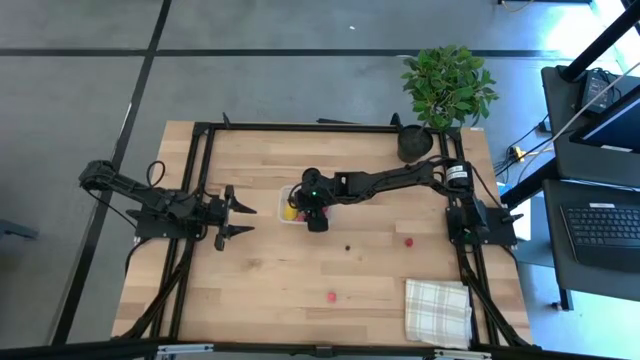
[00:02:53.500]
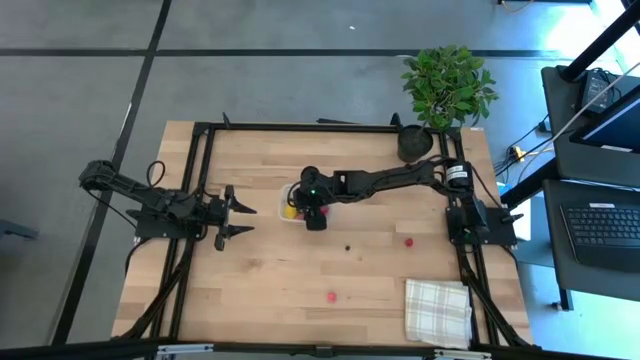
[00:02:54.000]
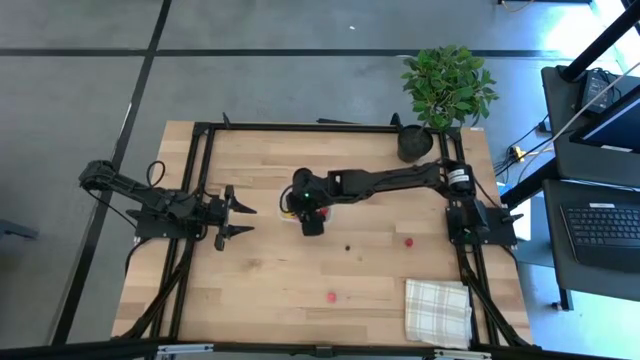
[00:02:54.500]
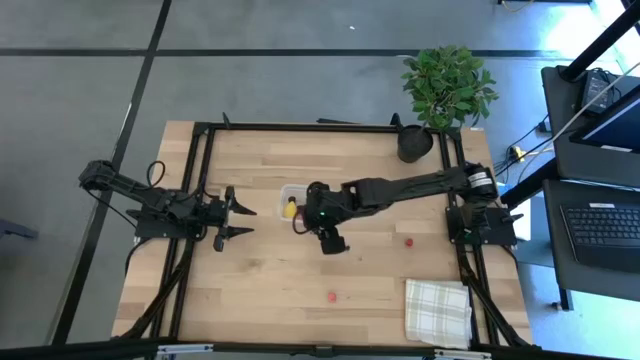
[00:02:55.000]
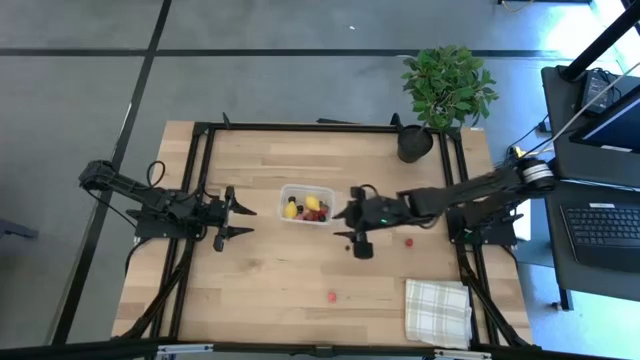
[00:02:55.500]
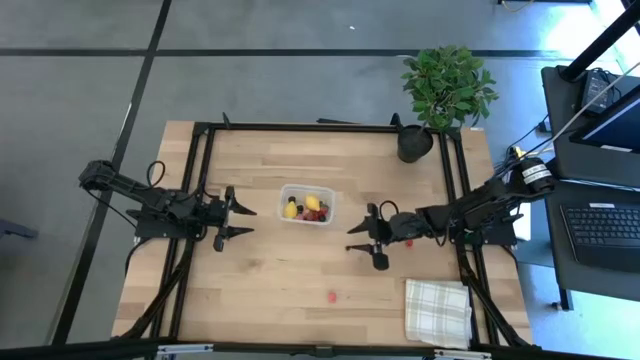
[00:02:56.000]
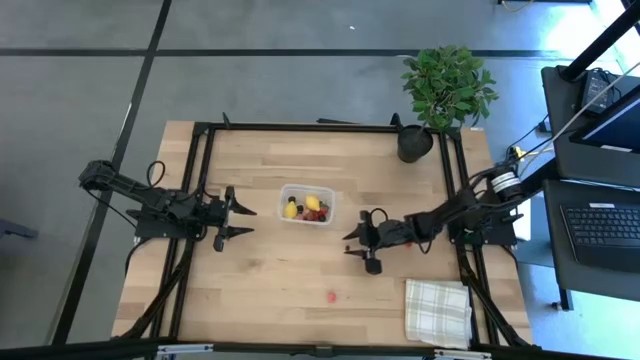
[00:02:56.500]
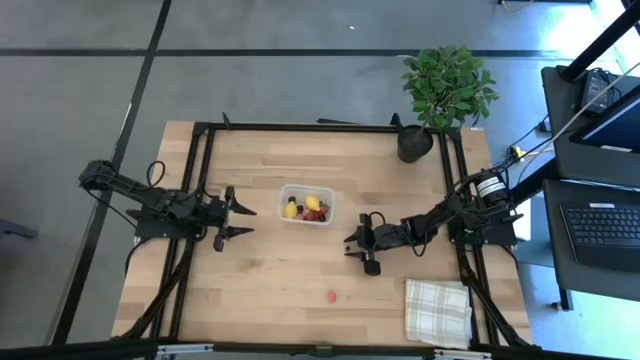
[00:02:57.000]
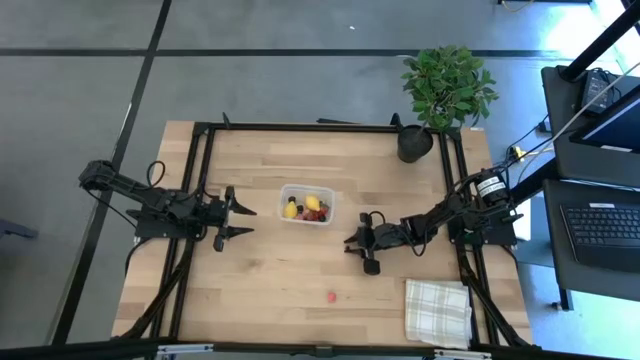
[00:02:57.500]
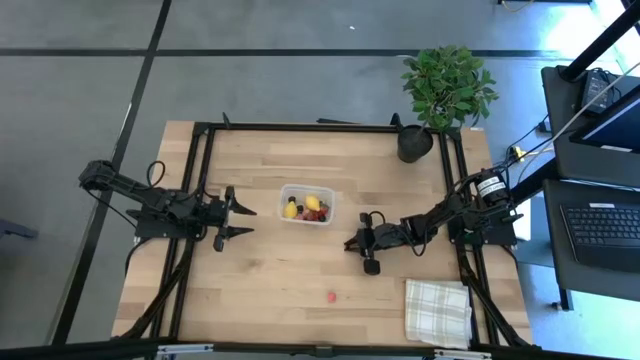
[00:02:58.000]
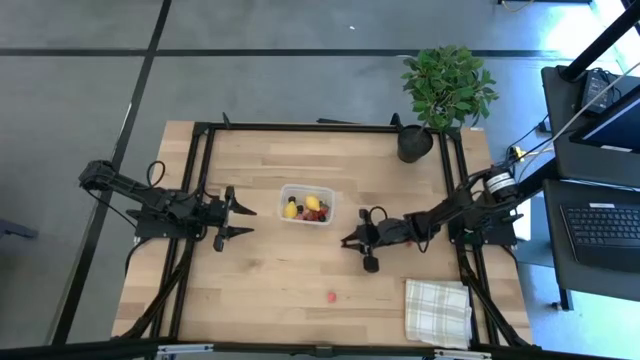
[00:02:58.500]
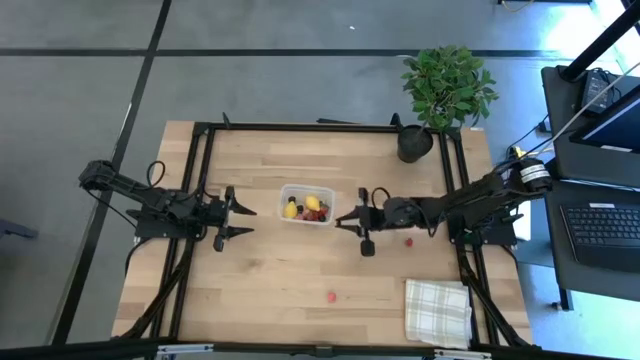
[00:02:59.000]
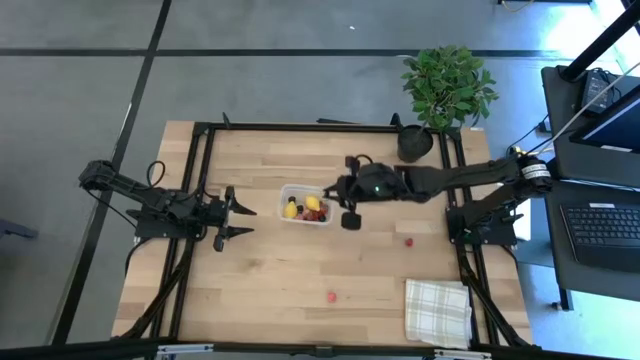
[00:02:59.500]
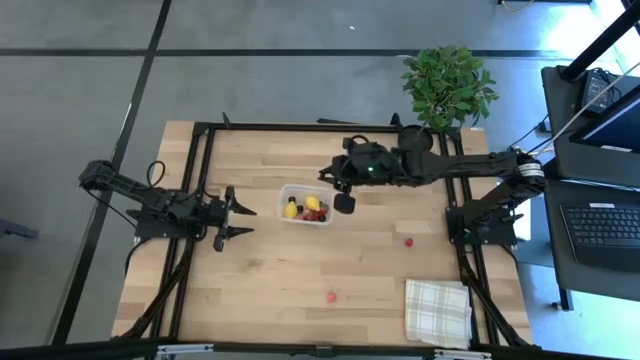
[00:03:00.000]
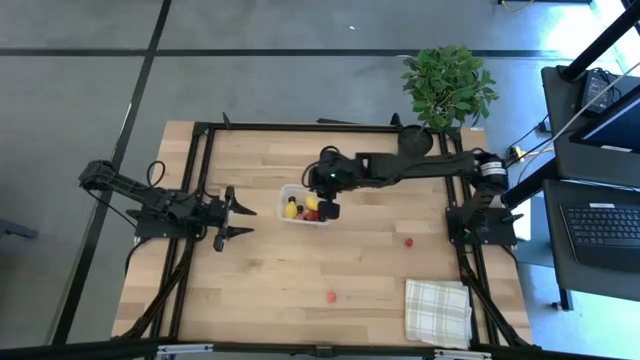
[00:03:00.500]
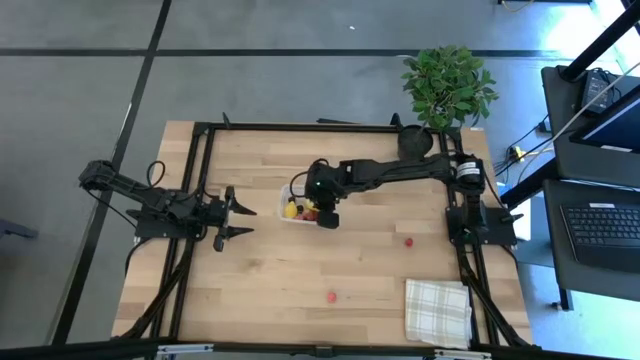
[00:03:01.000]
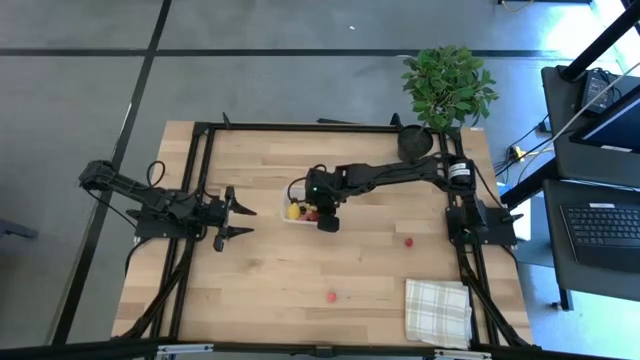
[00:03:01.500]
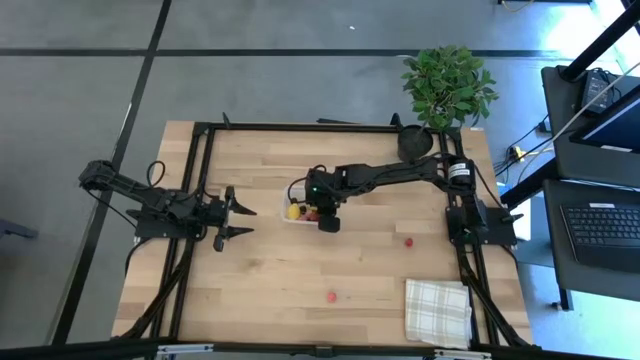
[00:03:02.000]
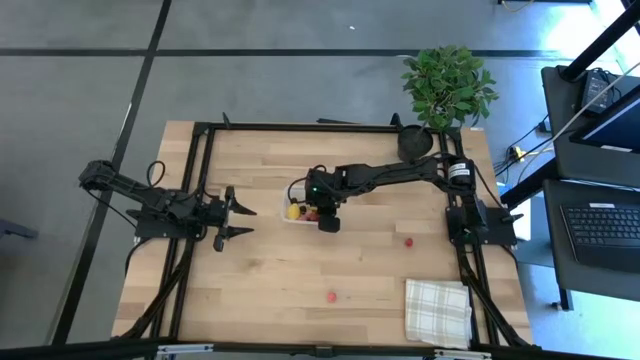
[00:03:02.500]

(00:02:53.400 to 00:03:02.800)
Task: Pick and placing Produce into tupperware
Put the blueberry into the transparent bin

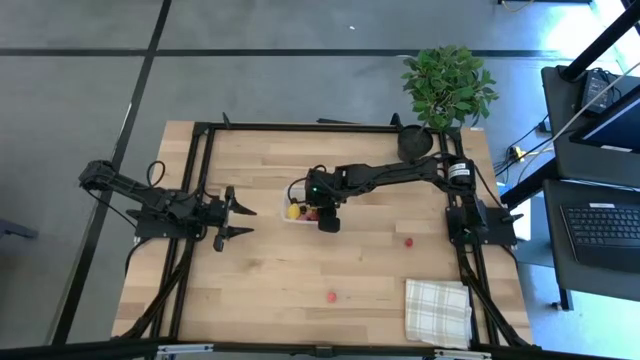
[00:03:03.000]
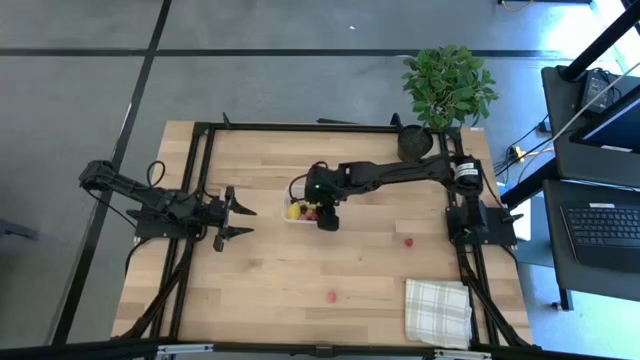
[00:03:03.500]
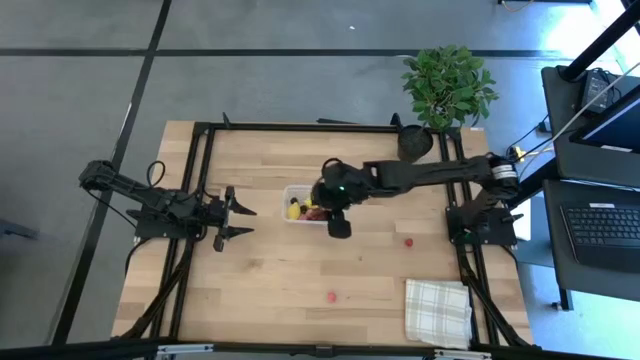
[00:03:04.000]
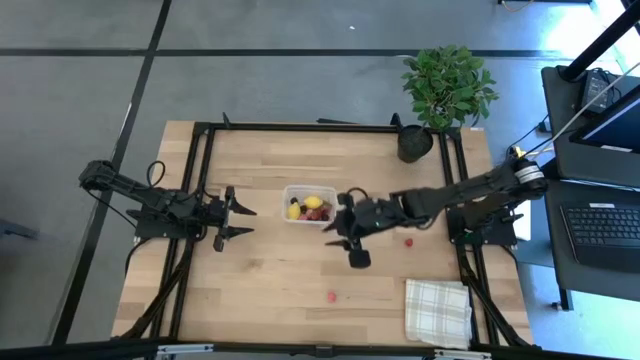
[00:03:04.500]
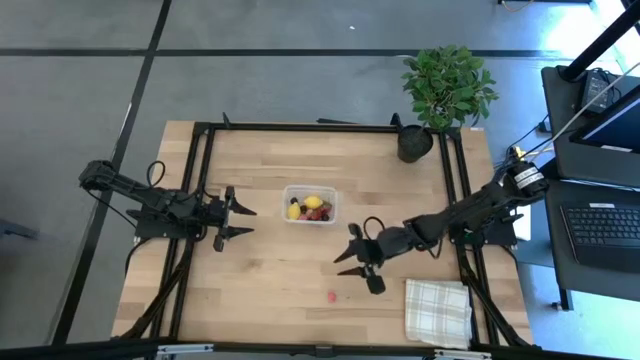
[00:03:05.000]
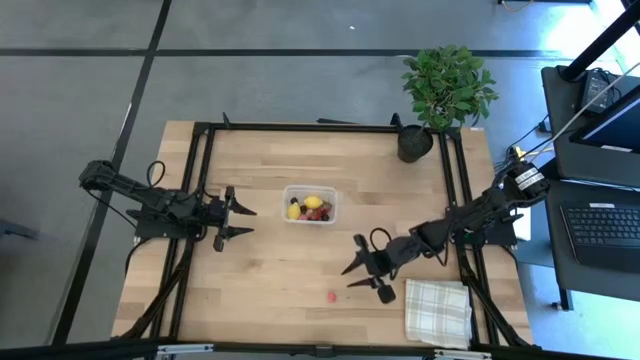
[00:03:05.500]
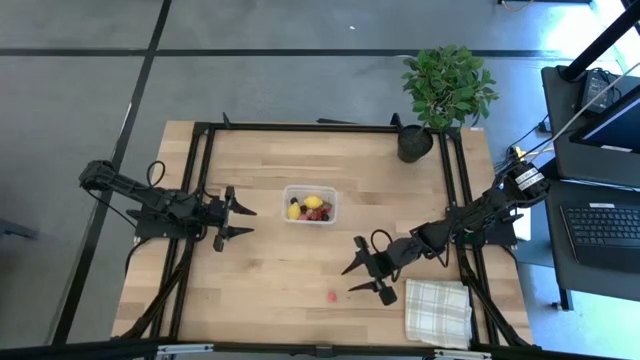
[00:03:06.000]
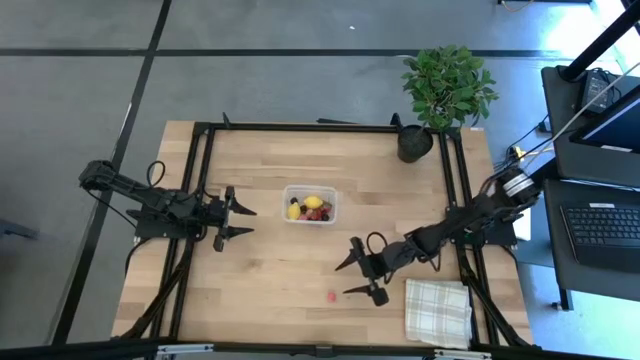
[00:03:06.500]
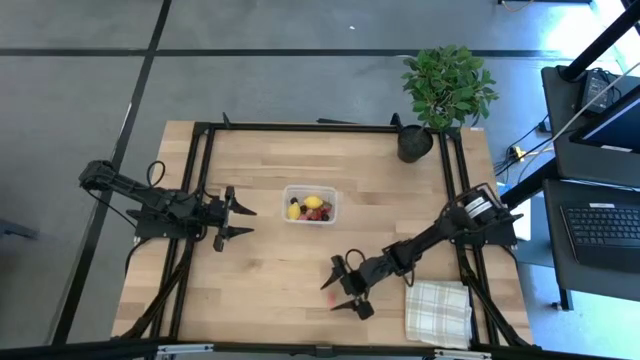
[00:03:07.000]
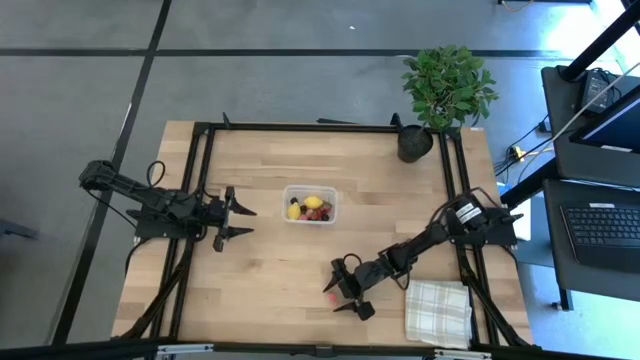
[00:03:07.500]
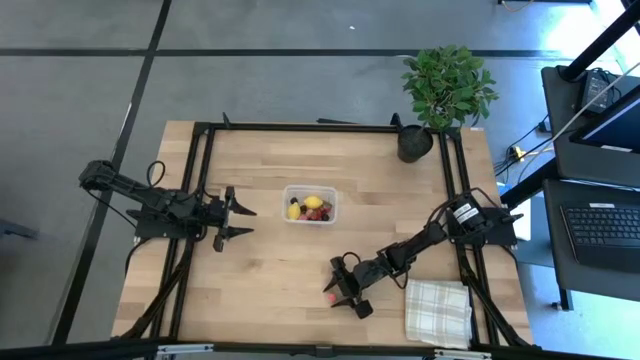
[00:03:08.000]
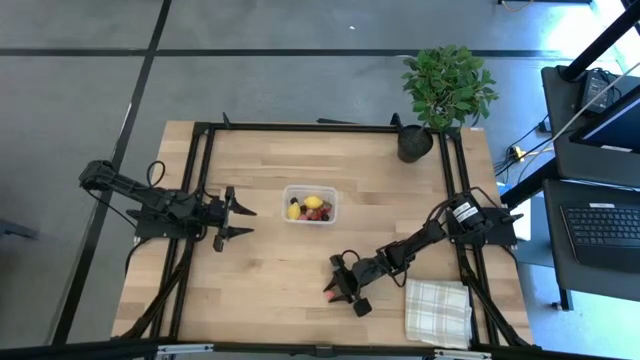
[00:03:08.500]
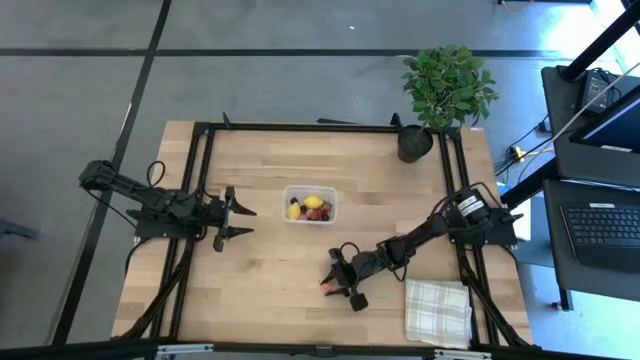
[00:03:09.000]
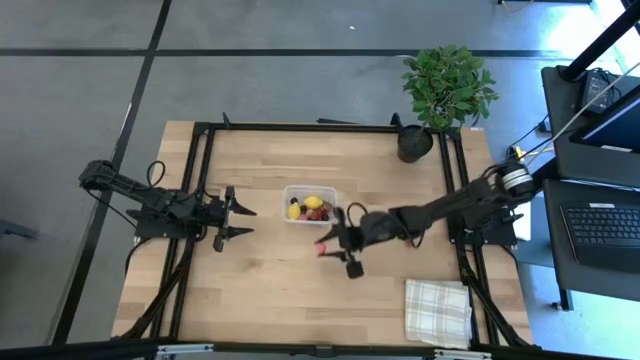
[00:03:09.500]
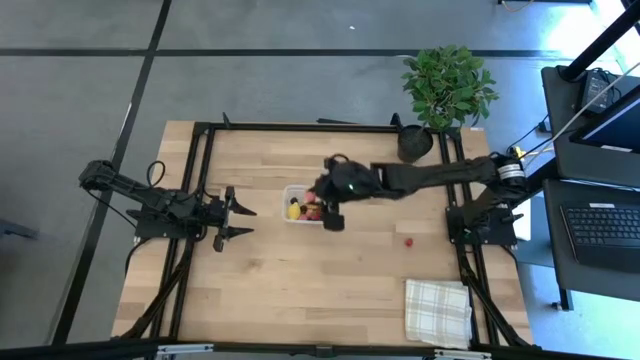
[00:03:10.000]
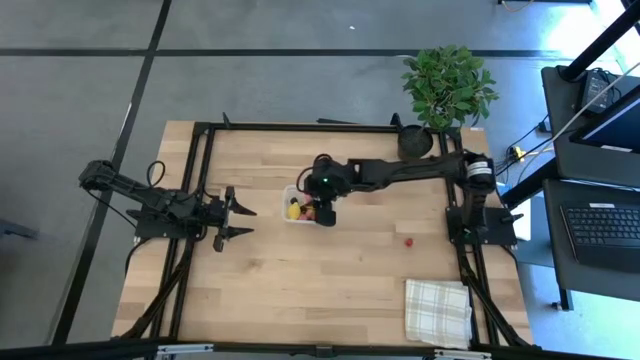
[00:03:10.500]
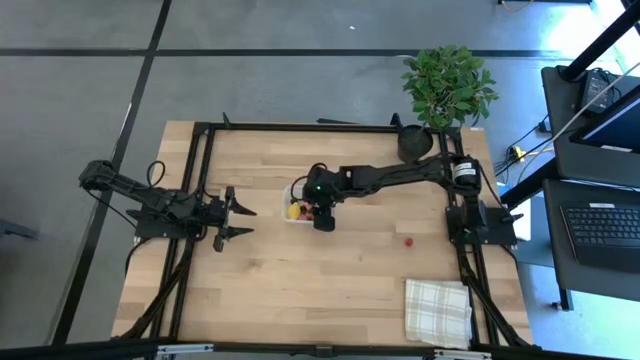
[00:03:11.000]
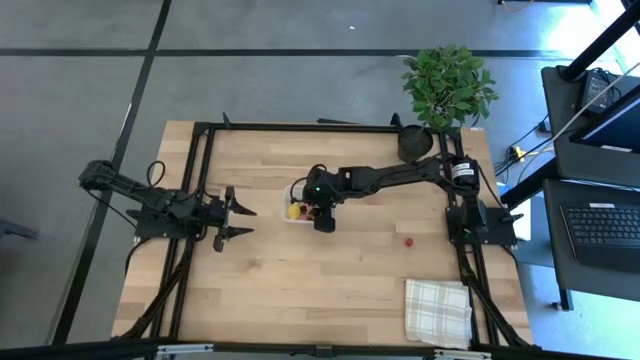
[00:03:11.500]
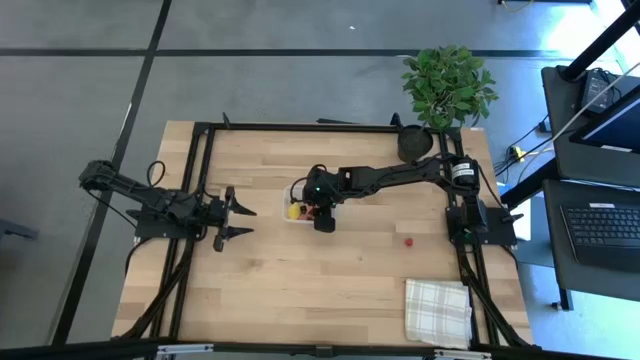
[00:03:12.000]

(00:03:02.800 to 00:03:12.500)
Put the apricot into the transparent bin

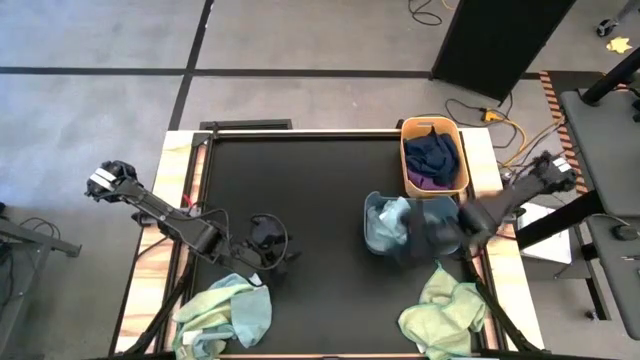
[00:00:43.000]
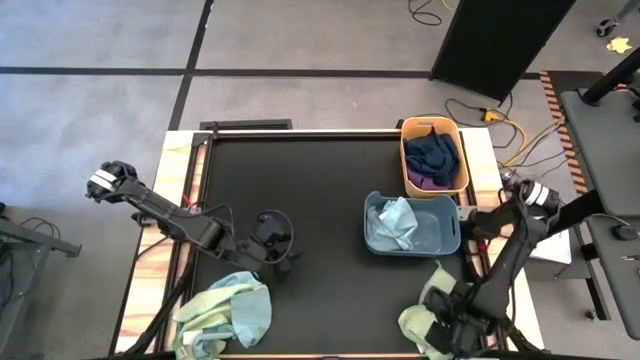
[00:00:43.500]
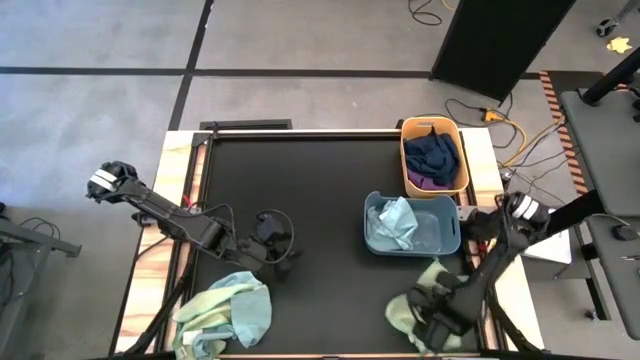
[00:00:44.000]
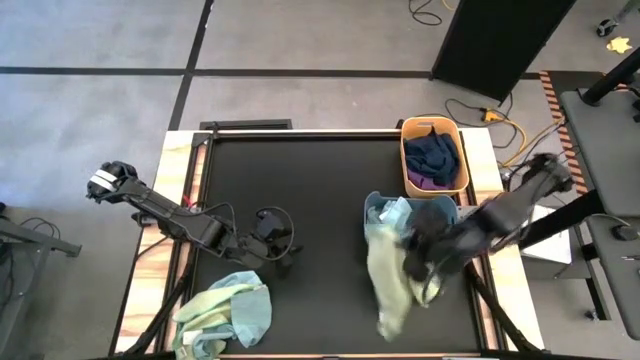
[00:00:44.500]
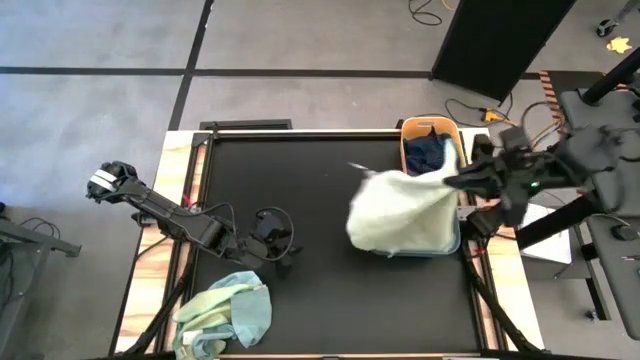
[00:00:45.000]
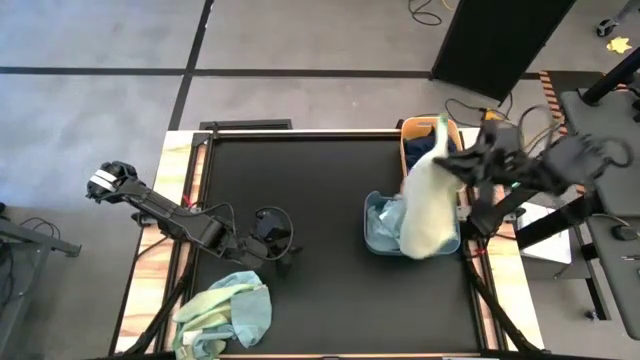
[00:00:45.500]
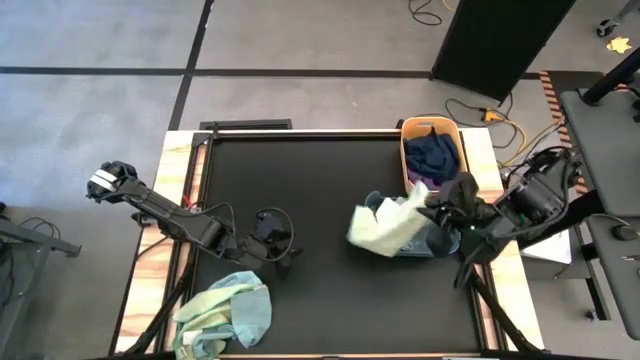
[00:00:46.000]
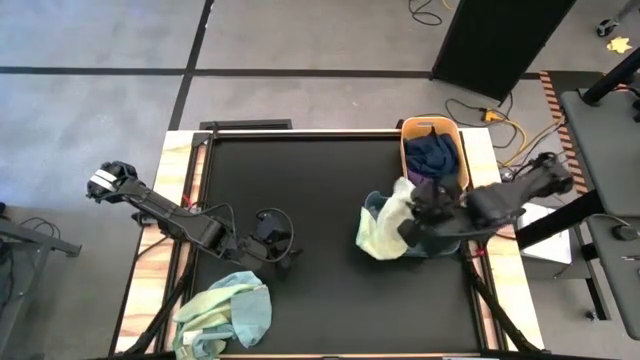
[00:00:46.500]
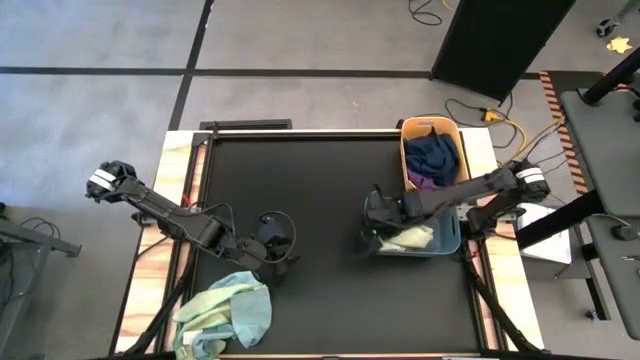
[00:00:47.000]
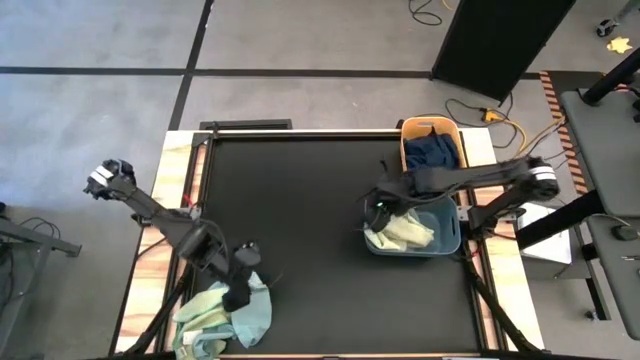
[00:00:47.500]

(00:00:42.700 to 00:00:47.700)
Task: Sort towels by color in basket
Put the right light green towel into the gray bin
